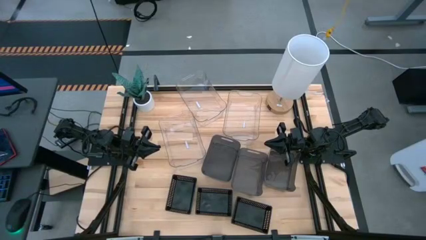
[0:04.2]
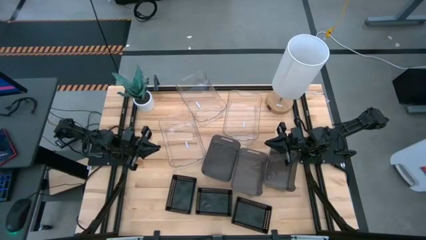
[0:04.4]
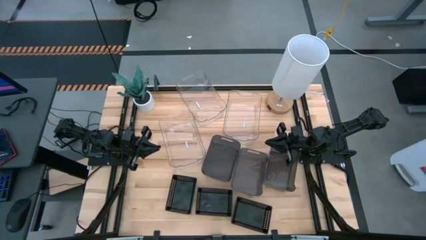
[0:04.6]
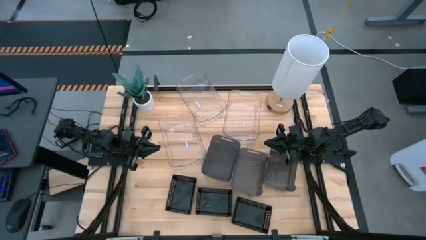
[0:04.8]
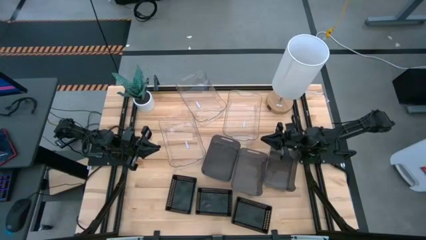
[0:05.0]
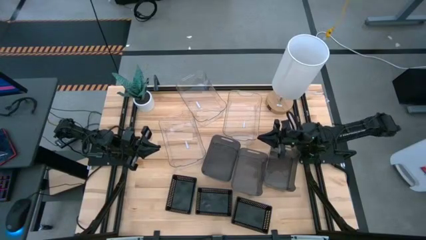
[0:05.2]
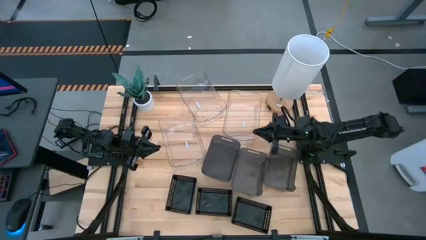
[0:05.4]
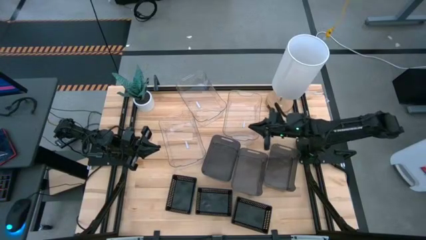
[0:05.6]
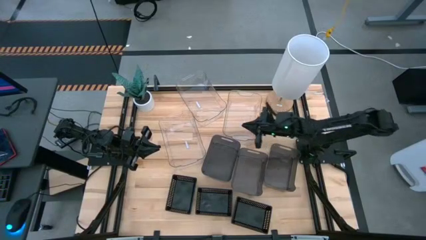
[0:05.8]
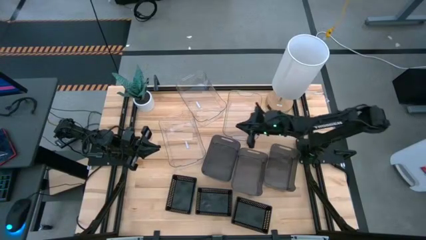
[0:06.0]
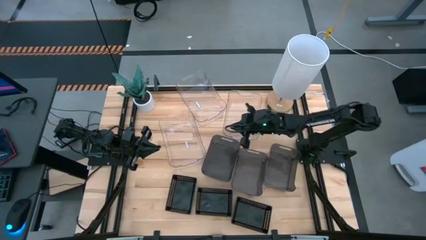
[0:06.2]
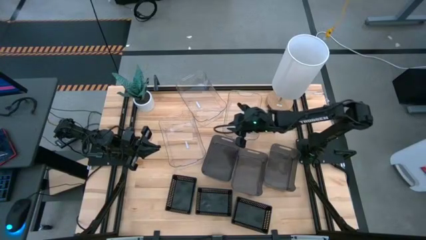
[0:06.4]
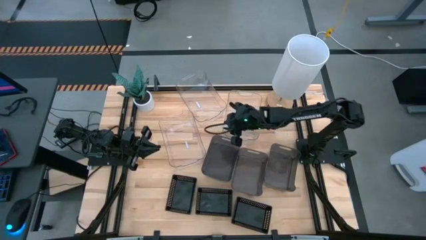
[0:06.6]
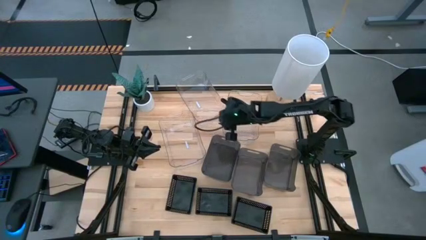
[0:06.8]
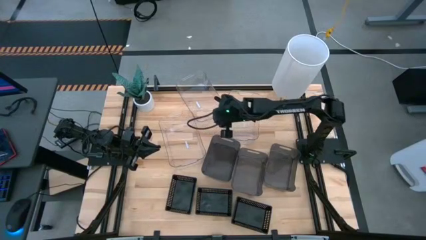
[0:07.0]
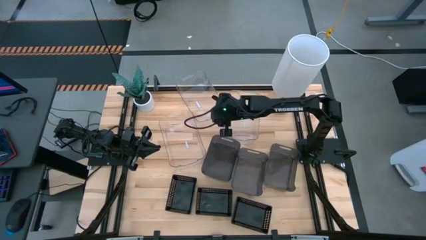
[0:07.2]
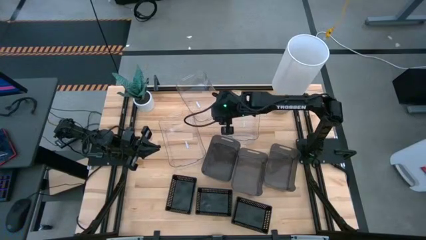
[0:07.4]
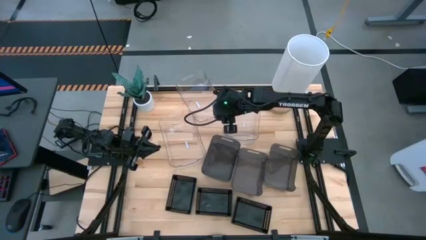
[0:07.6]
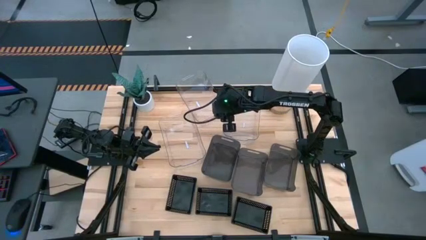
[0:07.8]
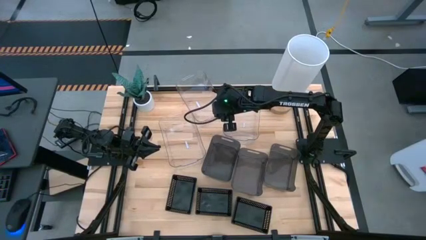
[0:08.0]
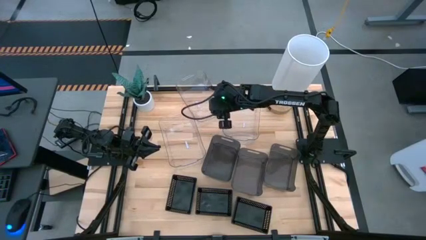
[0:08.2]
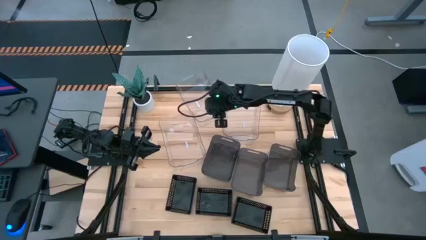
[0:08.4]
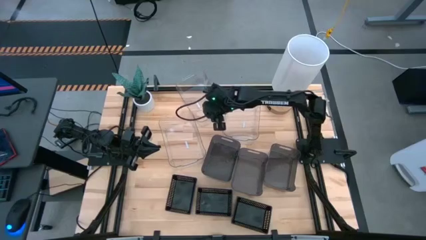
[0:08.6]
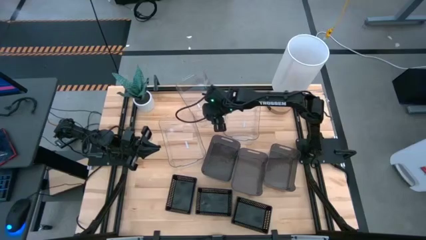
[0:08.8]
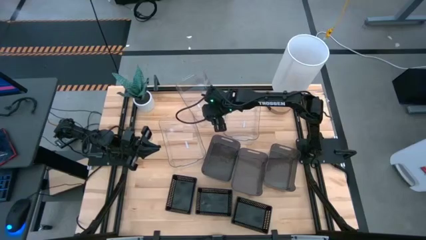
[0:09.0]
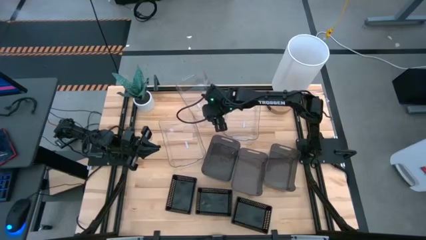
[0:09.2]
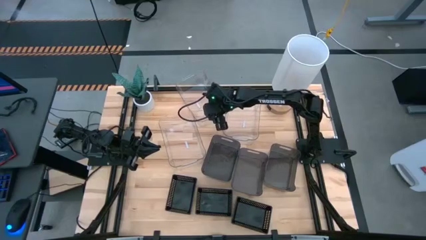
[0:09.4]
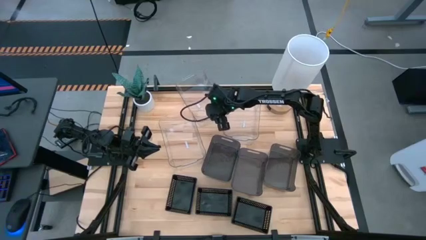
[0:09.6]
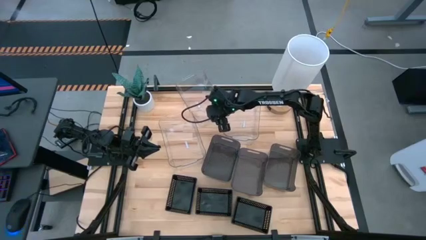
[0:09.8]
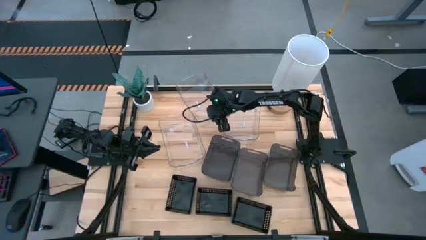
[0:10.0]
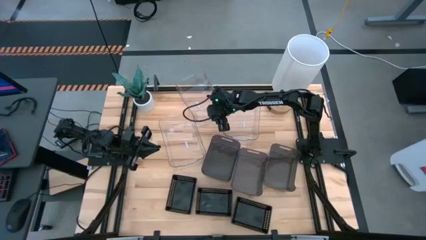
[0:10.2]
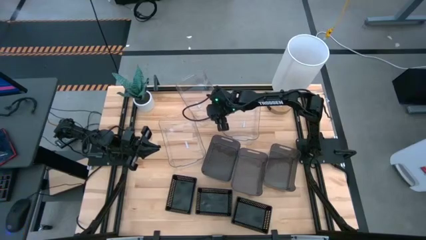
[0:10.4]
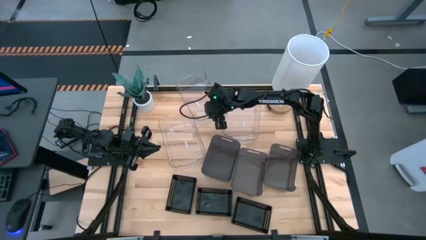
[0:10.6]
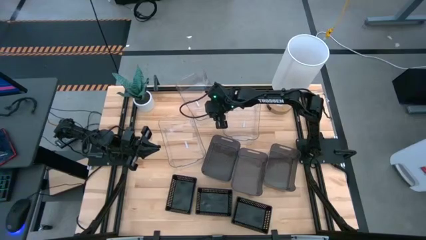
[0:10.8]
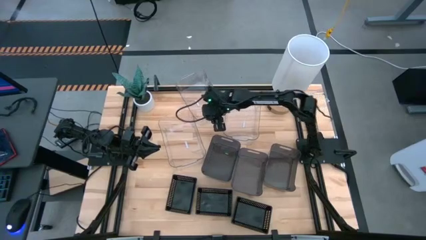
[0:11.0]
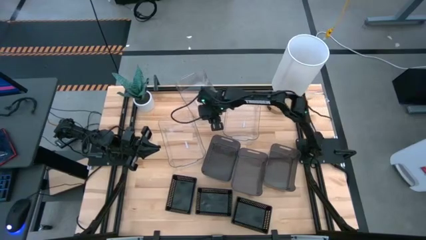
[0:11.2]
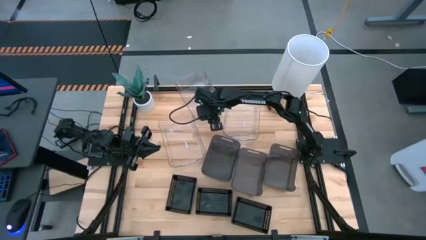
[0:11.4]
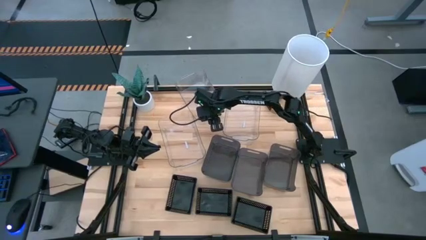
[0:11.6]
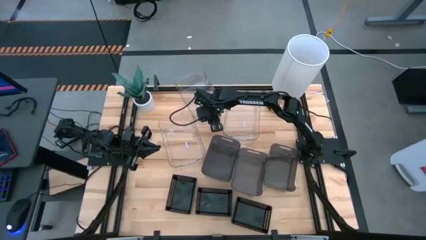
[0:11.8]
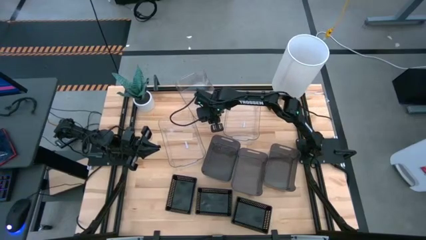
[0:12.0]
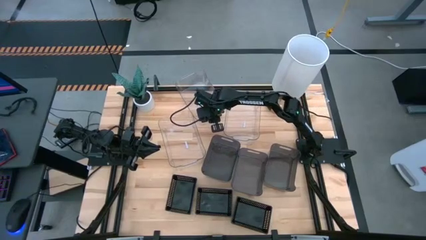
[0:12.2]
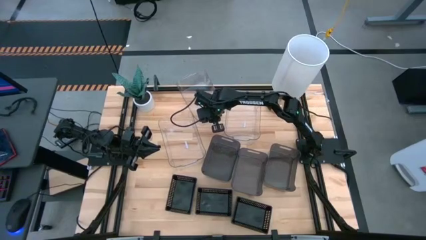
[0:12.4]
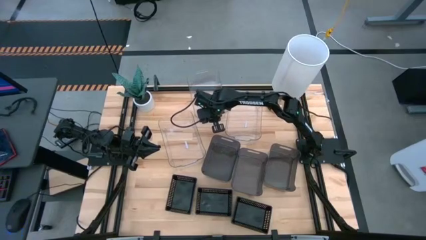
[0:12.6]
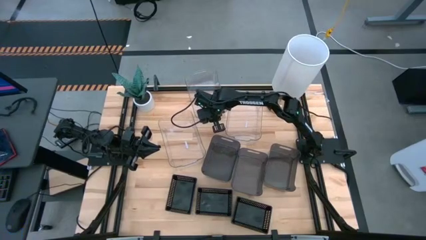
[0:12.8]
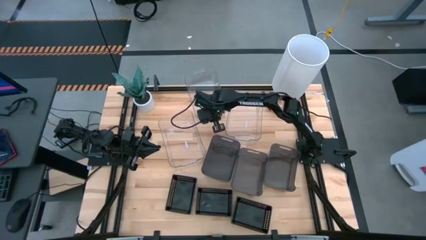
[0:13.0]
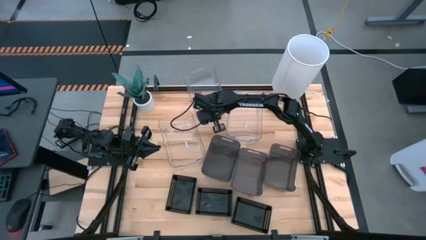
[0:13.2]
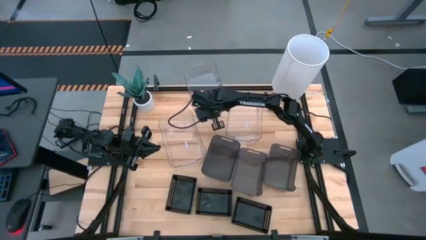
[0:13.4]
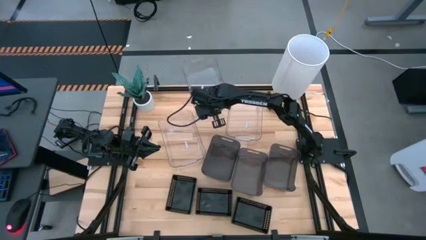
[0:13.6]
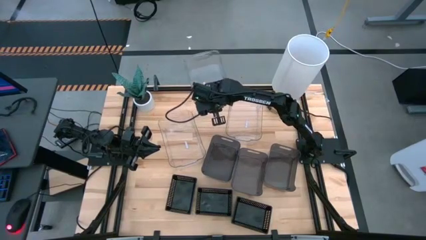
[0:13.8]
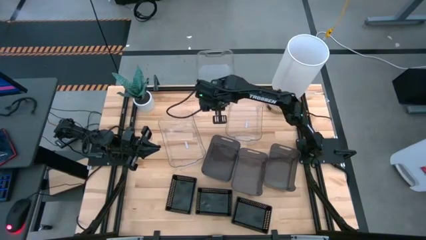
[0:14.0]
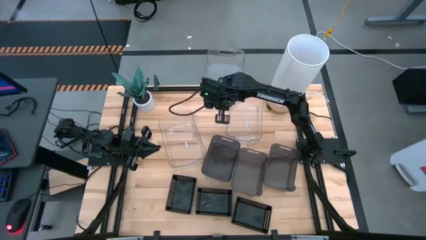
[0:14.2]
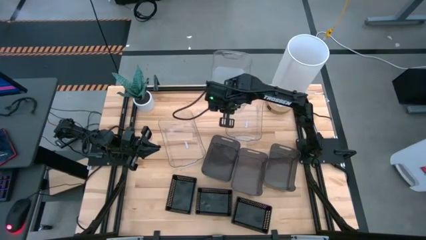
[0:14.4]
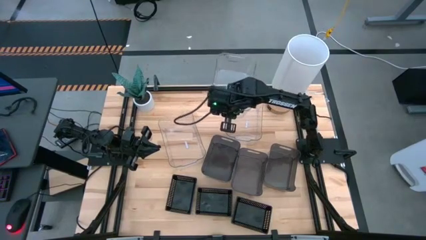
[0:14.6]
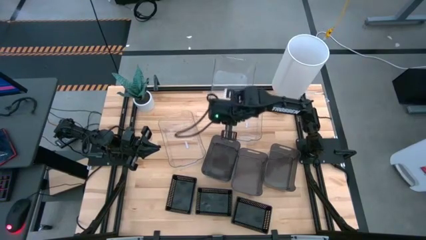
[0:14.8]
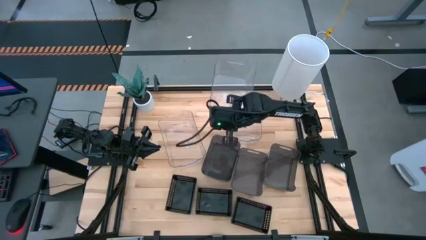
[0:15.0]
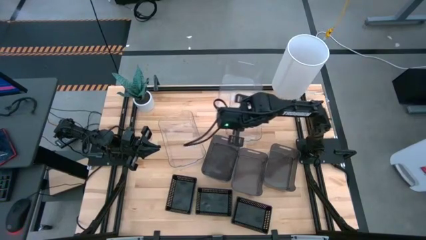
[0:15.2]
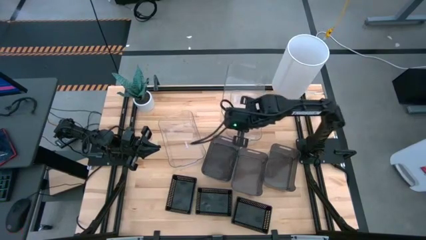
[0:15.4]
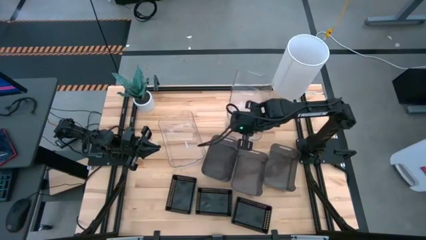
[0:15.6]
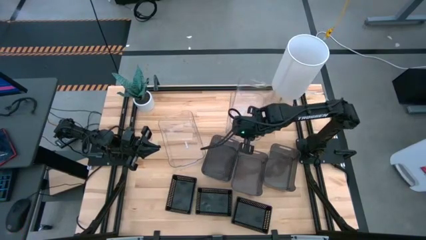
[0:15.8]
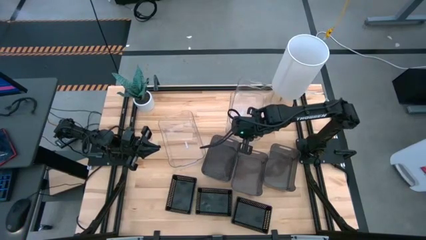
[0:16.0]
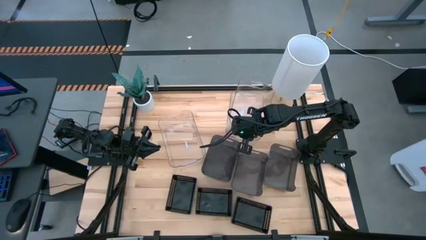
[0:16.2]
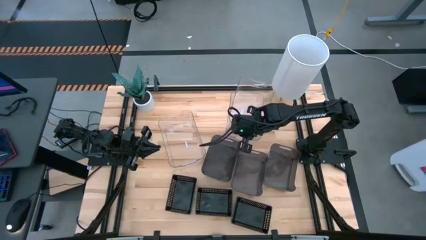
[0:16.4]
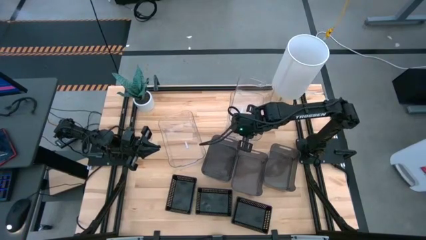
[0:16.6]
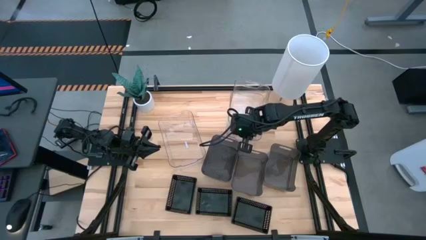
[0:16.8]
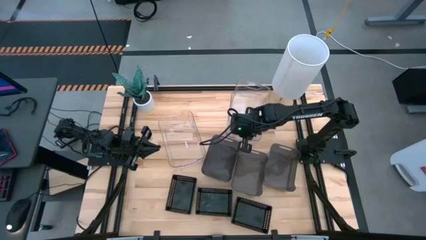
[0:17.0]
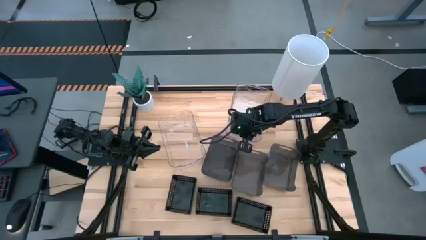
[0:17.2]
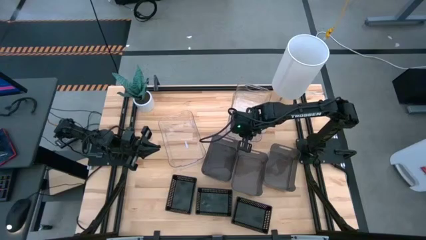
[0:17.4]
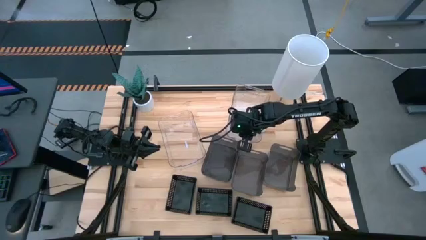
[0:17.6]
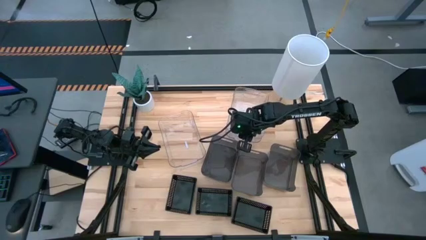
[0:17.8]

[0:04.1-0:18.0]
Stack the middle transparent bin on top of the right transparent bin
